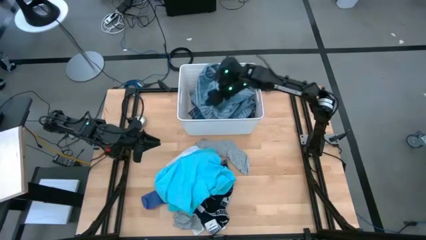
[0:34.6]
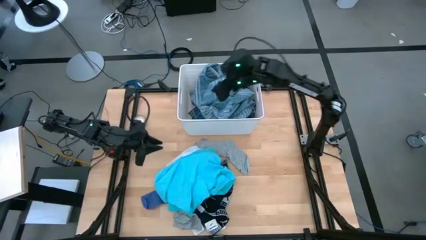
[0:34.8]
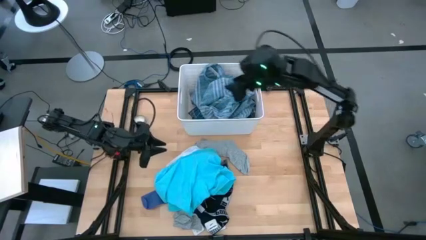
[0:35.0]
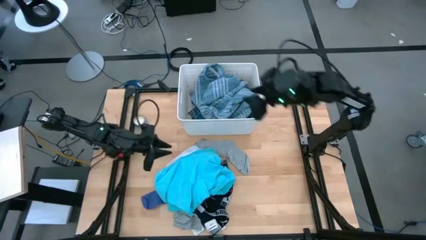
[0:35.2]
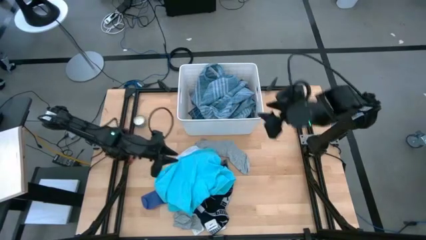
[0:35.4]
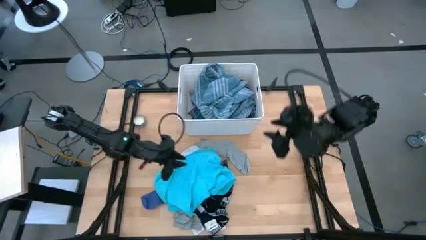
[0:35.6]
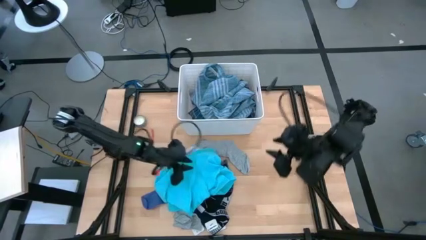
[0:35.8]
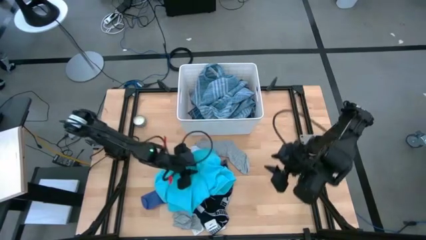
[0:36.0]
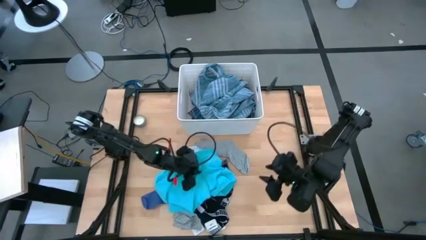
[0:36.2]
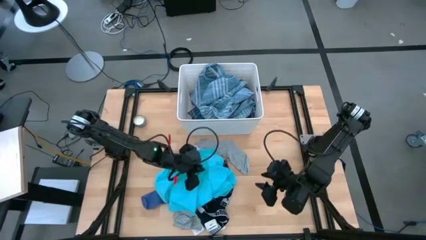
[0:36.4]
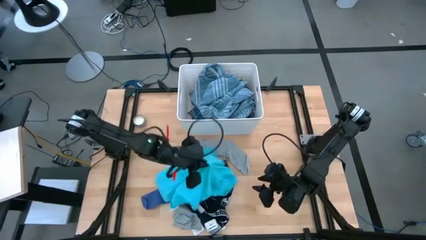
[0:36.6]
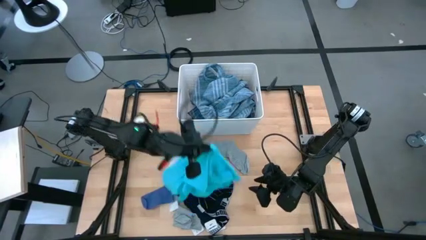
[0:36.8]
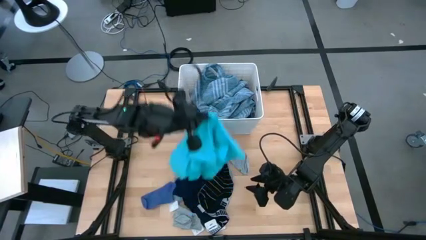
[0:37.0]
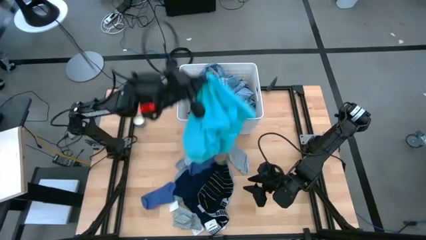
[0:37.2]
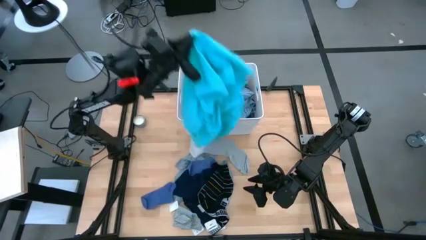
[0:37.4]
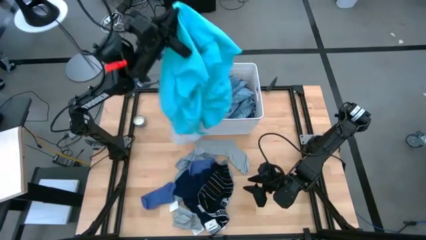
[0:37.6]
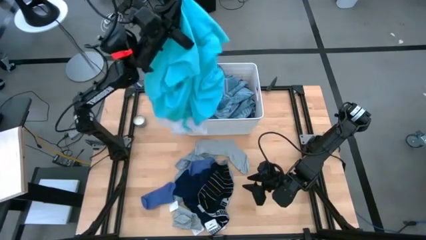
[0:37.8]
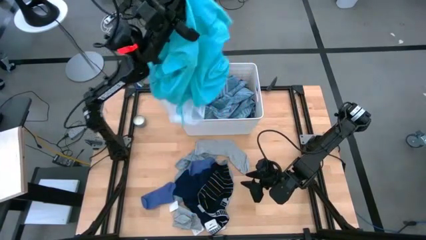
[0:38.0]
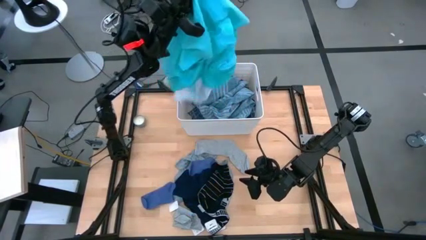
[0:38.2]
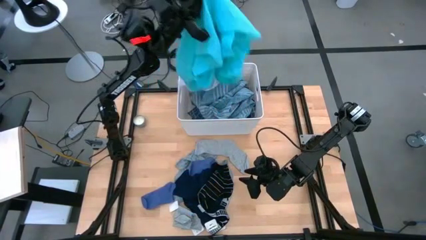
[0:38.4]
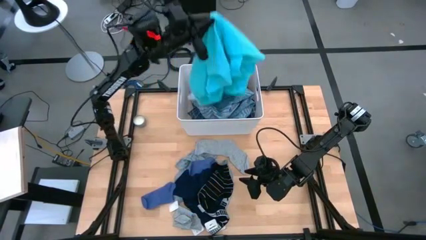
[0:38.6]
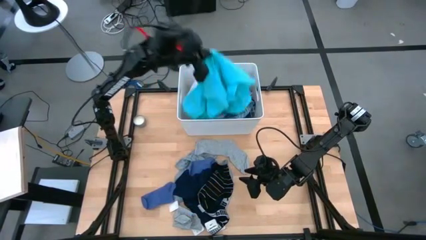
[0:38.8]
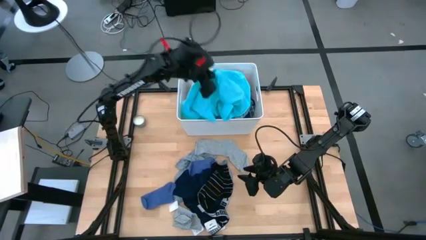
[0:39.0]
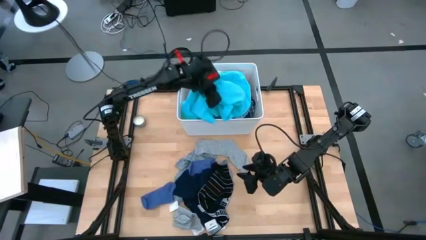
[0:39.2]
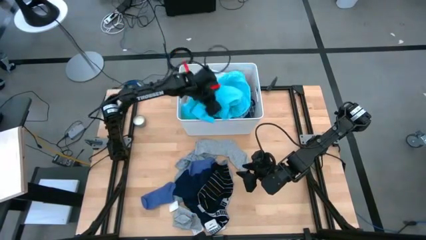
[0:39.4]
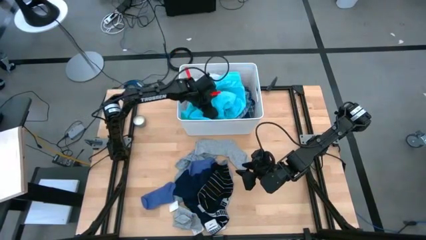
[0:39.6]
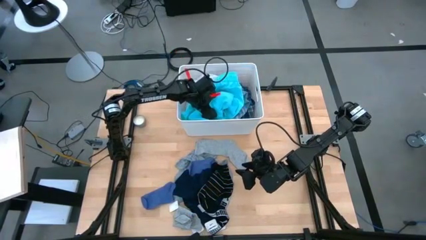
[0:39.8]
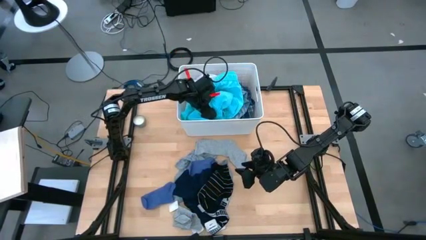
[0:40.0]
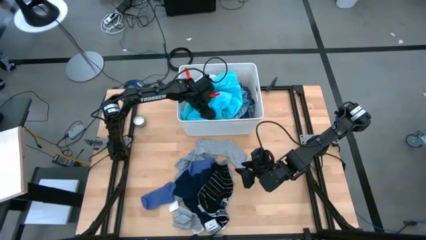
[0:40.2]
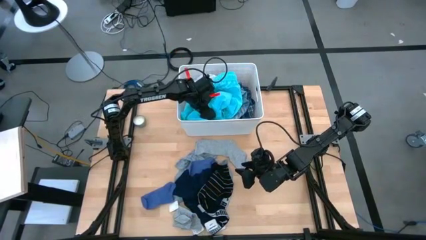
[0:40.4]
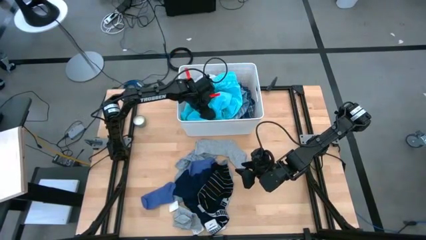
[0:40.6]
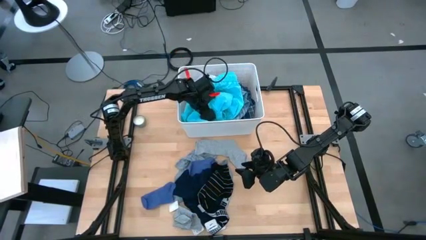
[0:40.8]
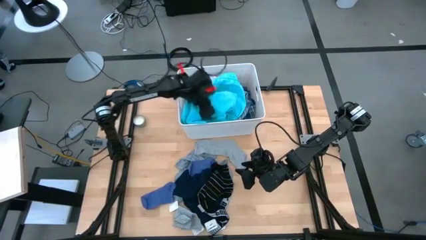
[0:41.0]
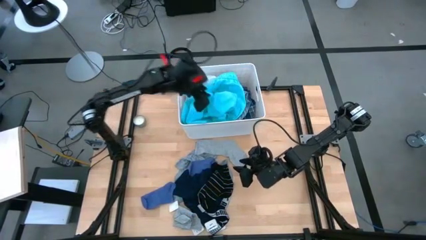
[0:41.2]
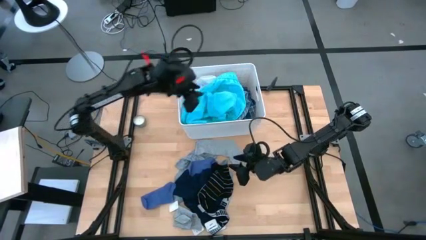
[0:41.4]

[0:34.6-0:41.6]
Task: Sort clothes
Put the light blue shorts into the bin

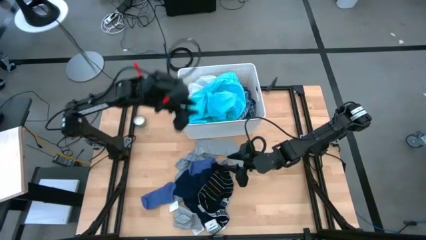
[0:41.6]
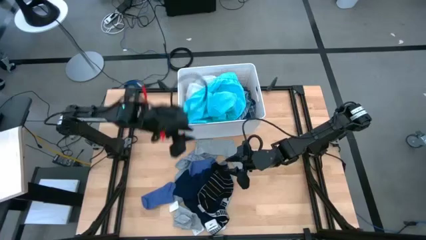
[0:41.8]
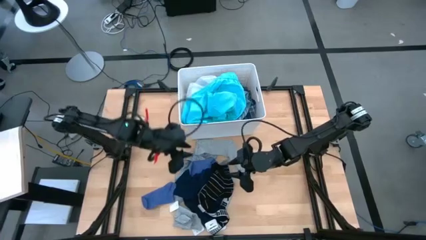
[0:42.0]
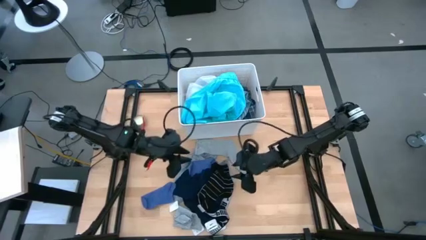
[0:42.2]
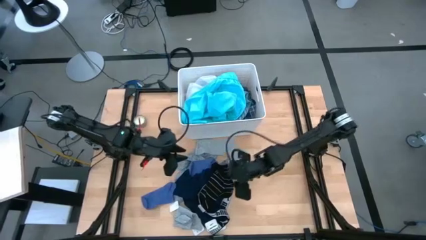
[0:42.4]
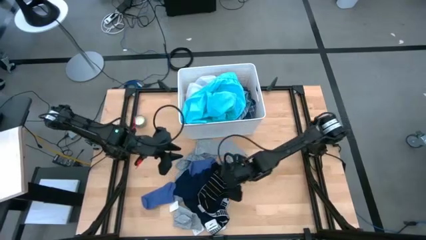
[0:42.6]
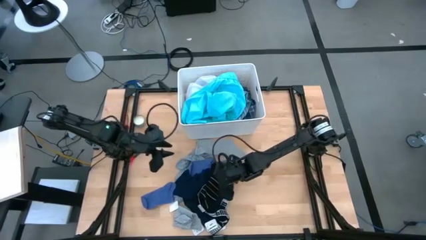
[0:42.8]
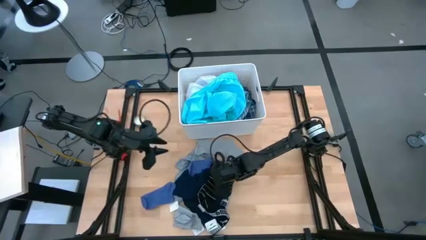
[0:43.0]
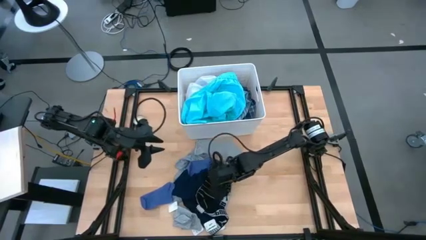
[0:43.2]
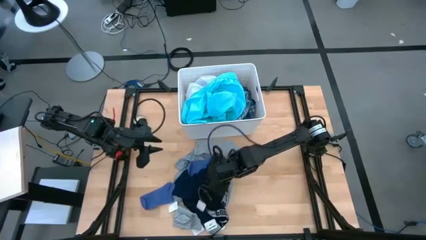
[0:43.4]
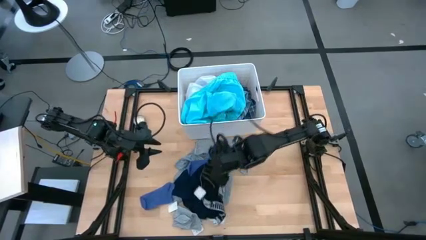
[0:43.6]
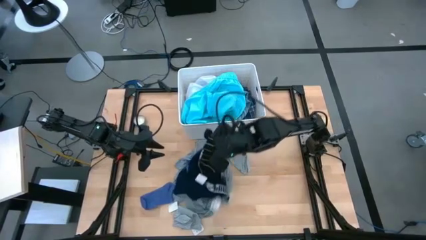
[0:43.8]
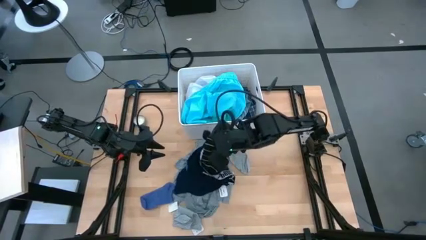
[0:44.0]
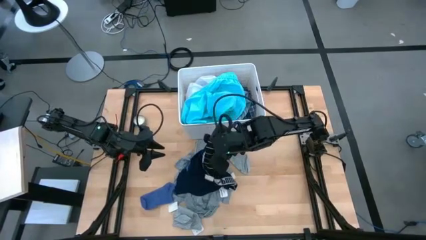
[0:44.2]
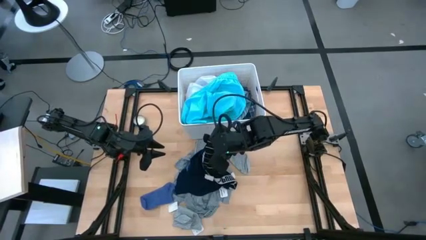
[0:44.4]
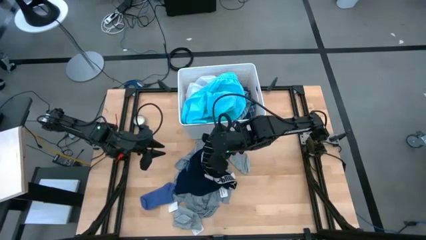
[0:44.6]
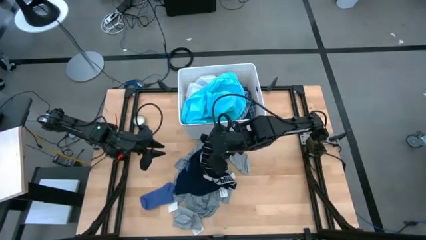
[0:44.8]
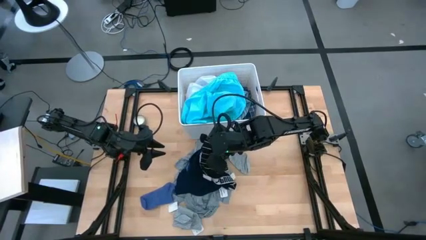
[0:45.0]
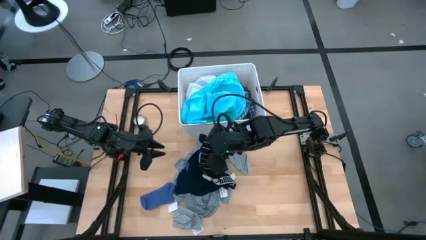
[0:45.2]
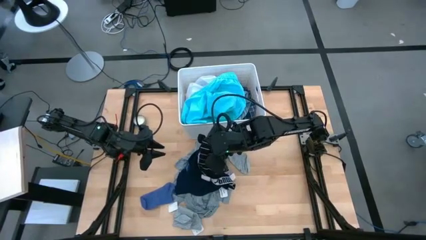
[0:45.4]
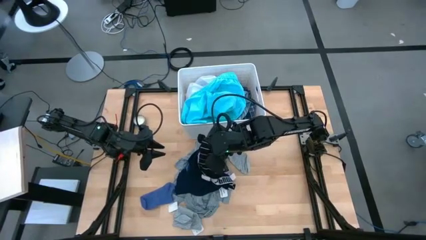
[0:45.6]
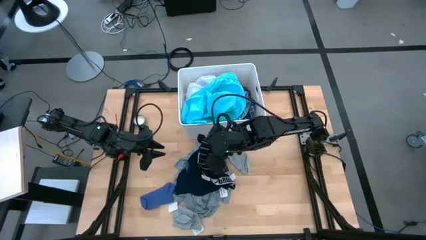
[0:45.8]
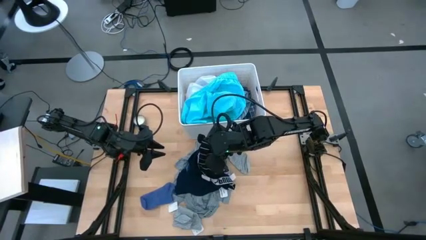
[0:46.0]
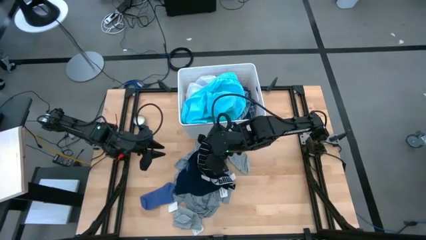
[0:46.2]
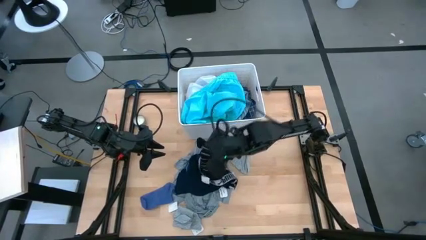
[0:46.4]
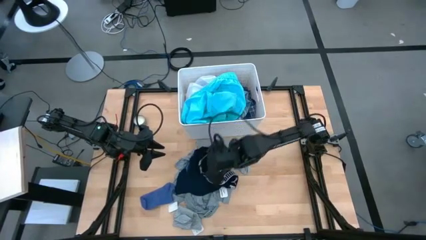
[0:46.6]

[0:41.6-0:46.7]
Put the black sock into the bin

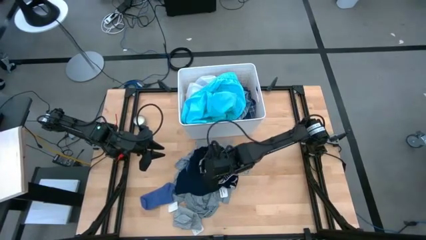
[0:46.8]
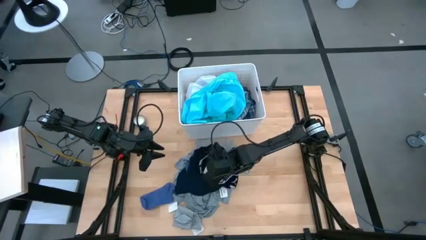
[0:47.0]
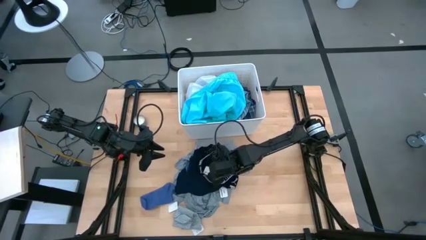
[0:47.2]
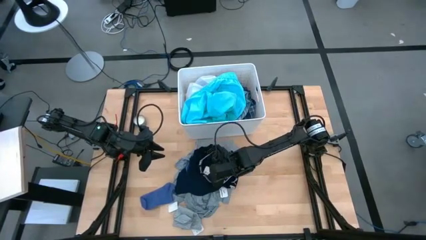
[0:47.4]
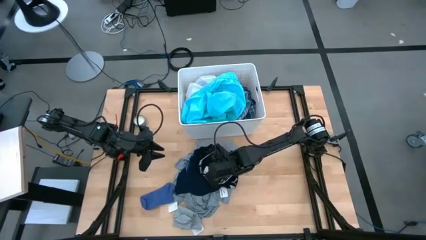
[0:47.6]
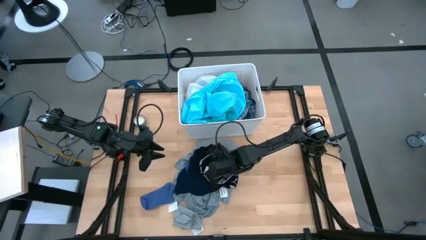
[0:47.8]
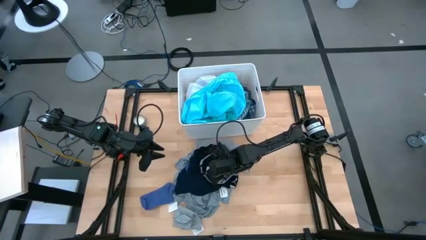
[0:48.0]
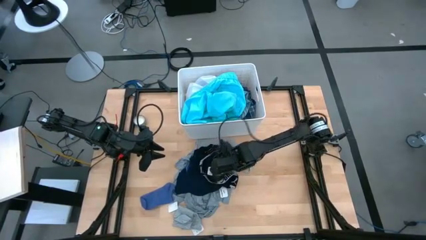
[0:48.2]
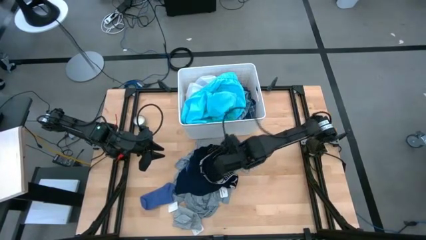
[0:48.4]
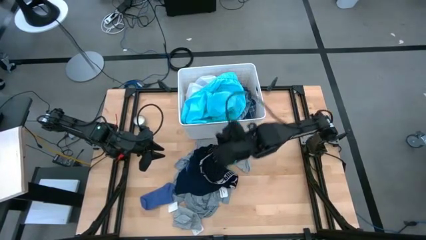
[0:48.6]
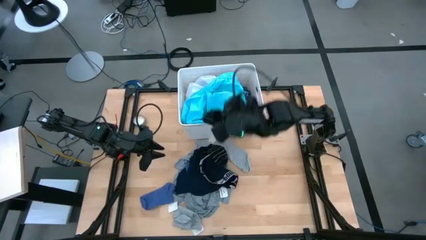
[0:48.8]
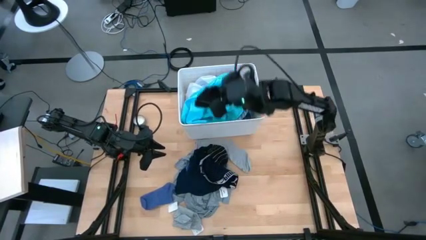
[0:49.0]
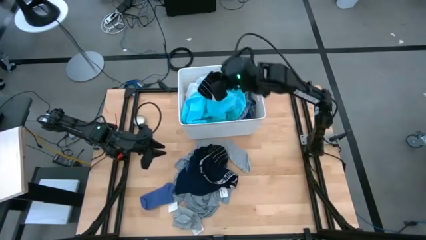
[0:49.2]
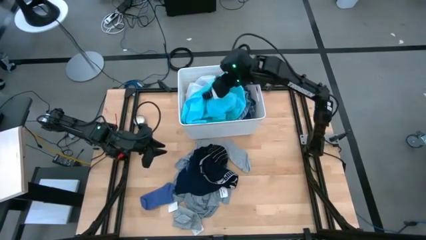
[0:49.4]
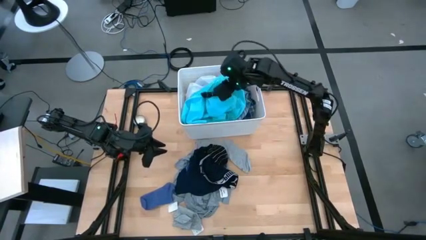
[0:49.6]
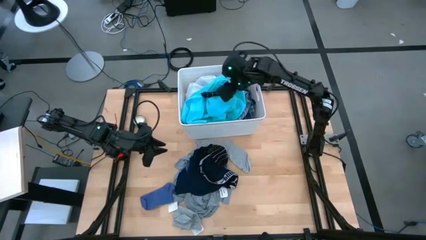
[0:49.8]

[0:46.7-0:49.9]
Put the black sock into the bin

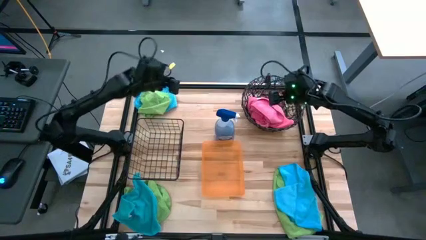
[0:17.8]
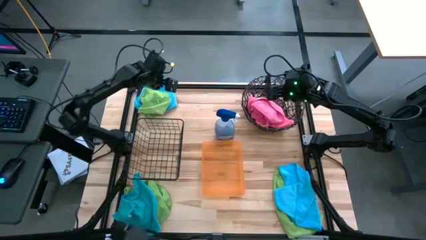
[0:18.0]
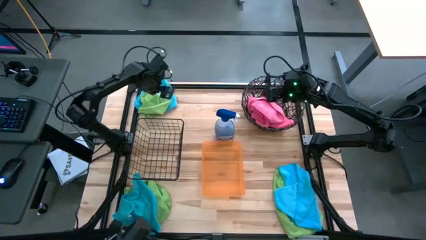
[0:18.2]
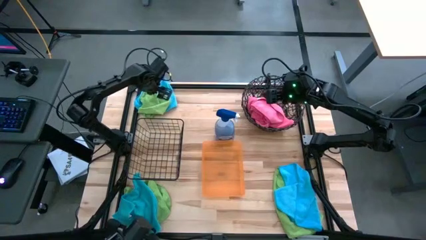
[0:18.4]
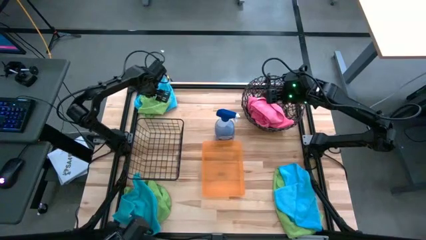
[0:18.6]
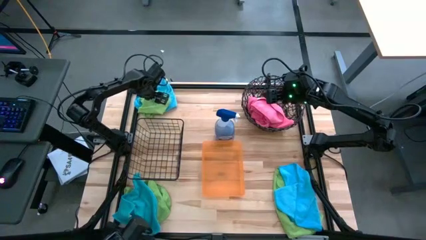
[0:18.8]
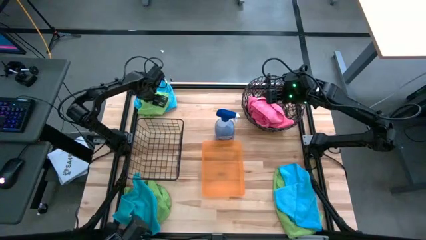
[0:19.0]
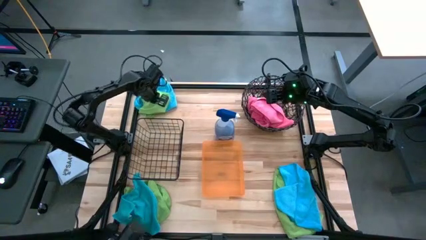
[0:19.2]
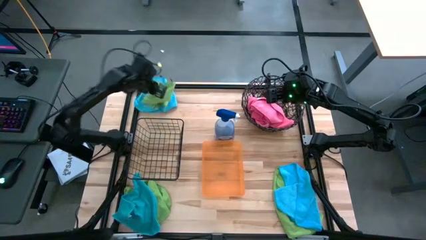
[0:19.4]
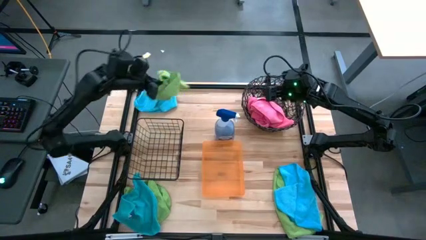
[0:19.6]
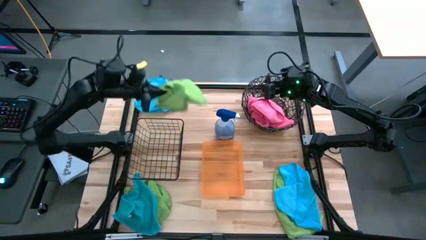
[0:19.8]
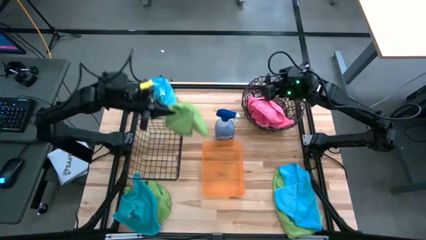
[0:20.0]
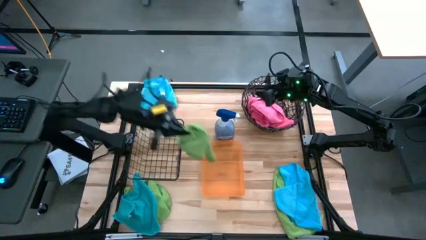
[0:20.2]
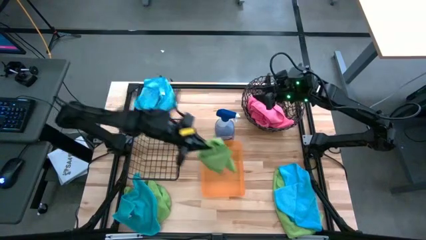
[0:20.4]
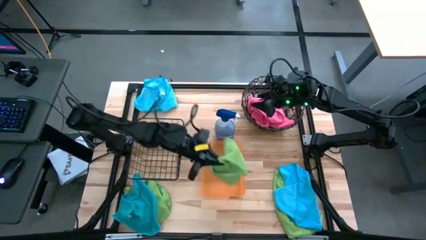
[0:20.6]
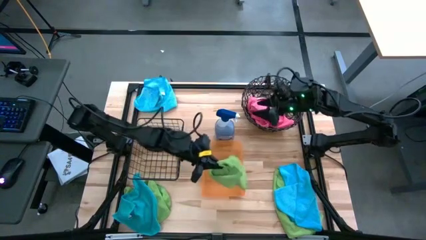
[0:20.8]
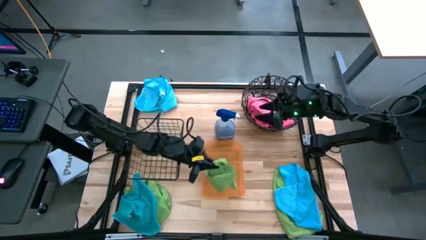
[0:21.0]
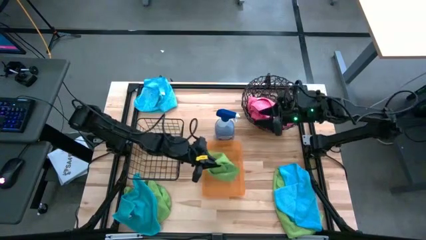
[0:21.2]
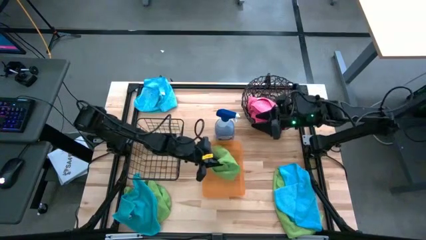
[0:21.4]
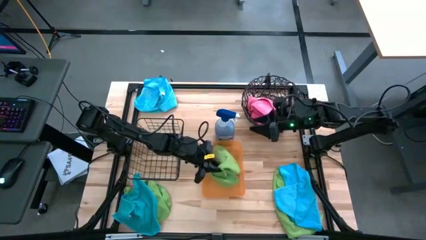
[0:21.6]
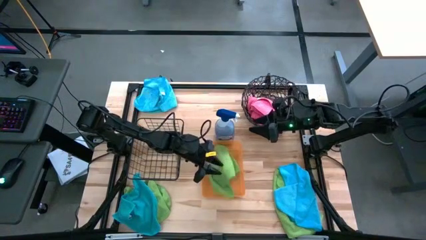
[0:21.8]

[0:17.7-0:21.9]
Task: Sort microfiber towel by color & place in baskets
Put the top left green microfiber cloth into the transparent orange bin
